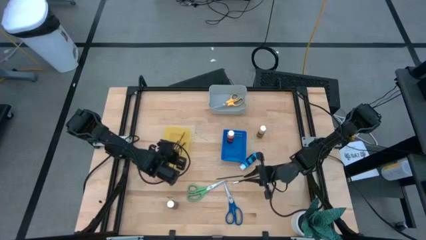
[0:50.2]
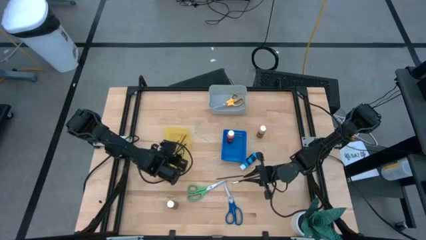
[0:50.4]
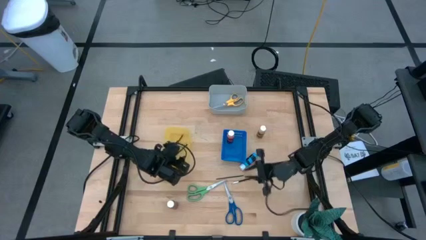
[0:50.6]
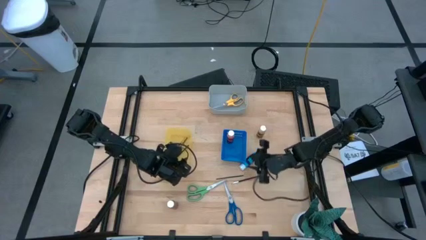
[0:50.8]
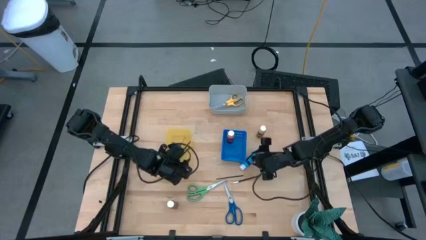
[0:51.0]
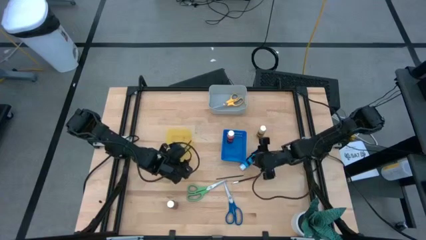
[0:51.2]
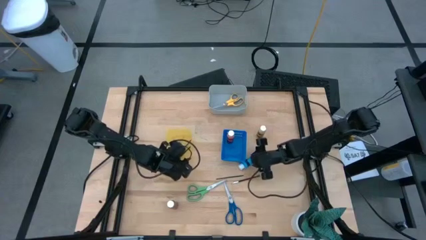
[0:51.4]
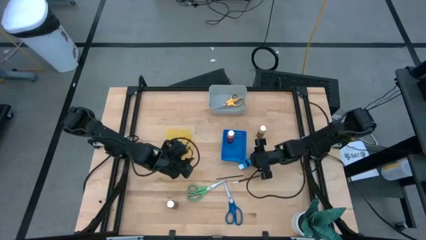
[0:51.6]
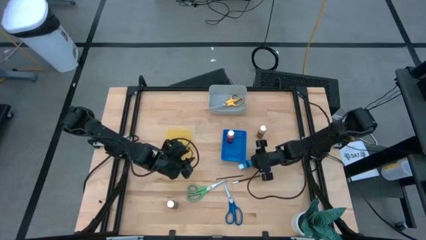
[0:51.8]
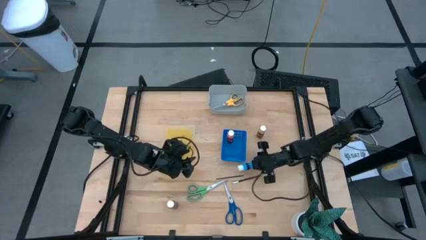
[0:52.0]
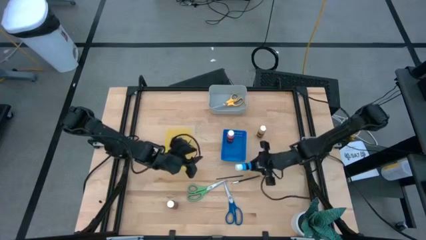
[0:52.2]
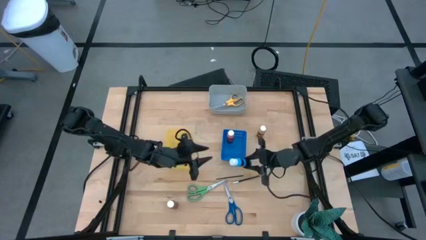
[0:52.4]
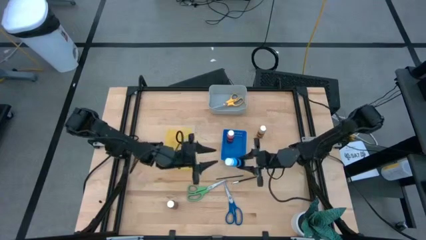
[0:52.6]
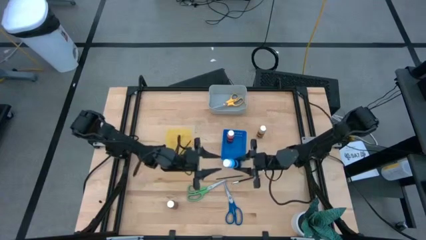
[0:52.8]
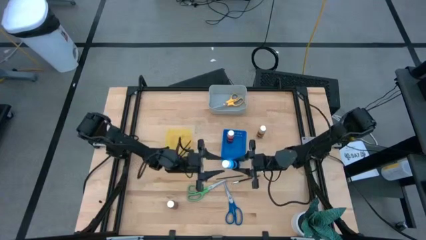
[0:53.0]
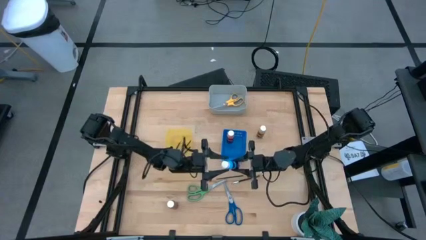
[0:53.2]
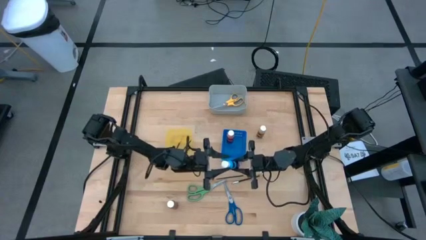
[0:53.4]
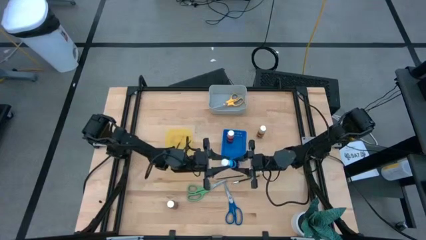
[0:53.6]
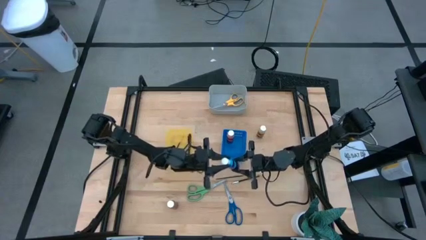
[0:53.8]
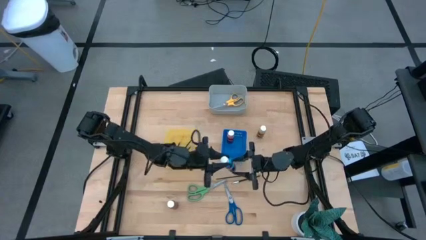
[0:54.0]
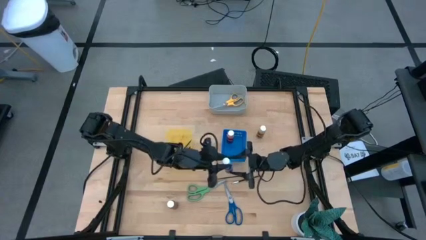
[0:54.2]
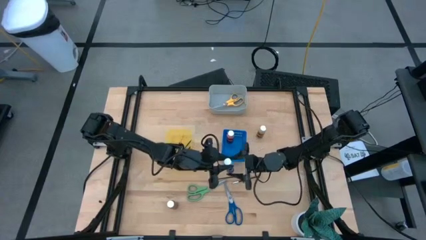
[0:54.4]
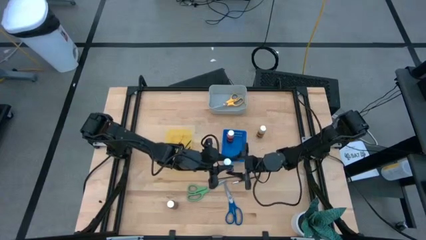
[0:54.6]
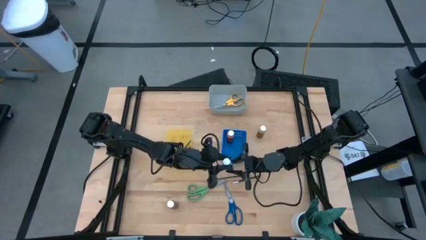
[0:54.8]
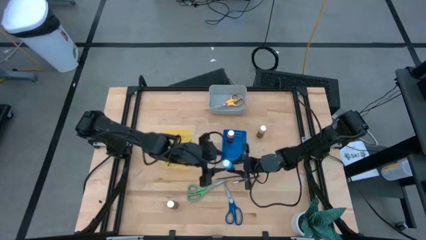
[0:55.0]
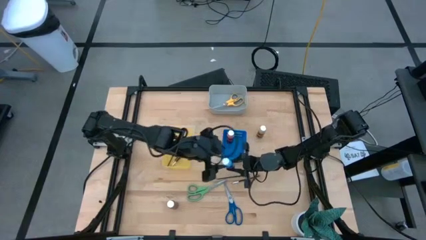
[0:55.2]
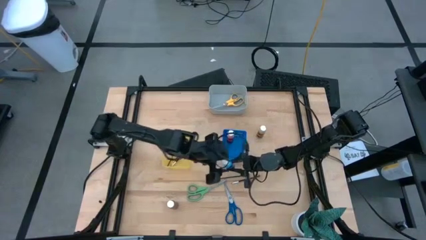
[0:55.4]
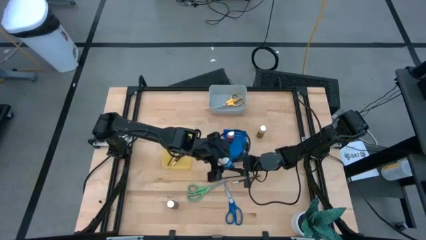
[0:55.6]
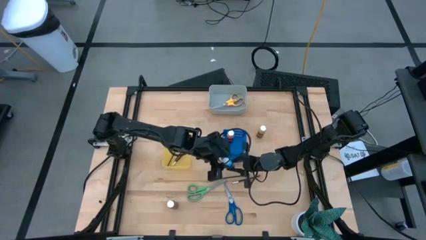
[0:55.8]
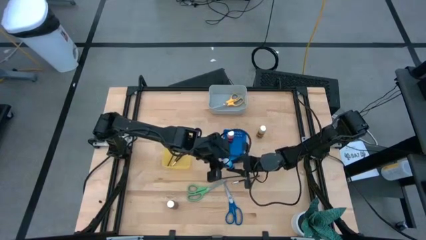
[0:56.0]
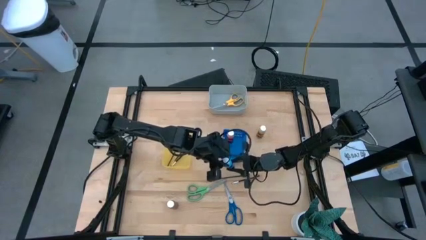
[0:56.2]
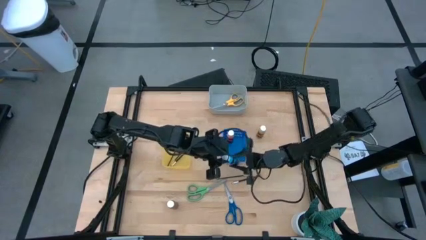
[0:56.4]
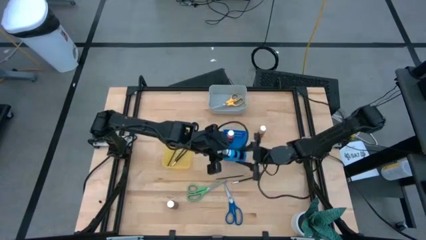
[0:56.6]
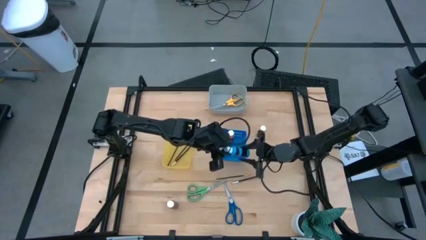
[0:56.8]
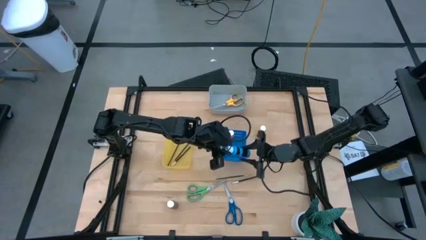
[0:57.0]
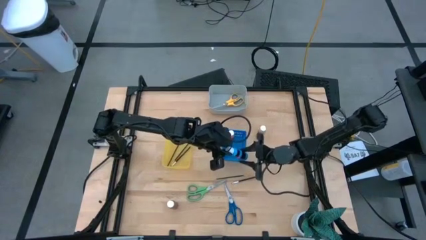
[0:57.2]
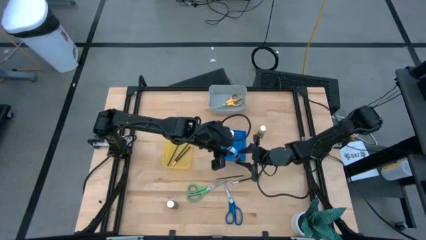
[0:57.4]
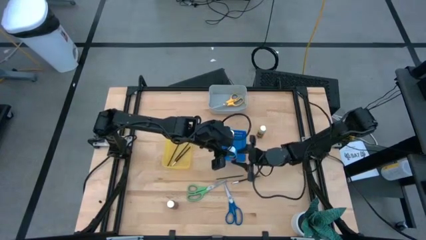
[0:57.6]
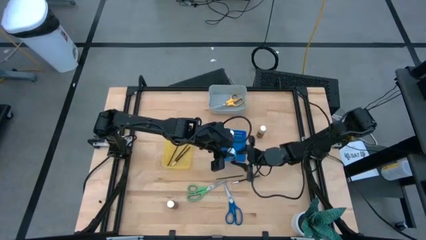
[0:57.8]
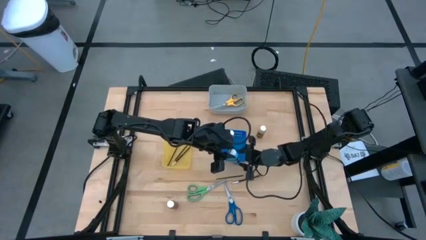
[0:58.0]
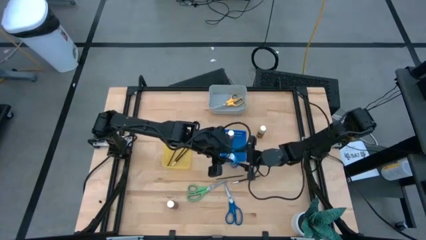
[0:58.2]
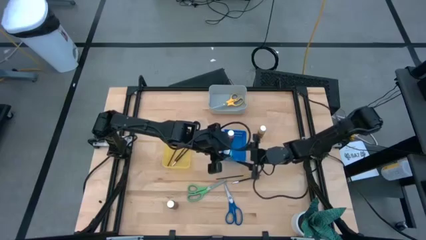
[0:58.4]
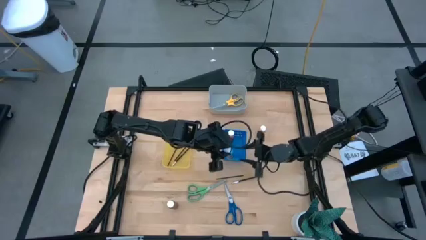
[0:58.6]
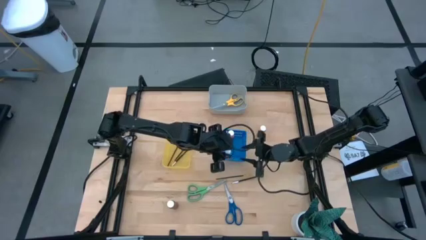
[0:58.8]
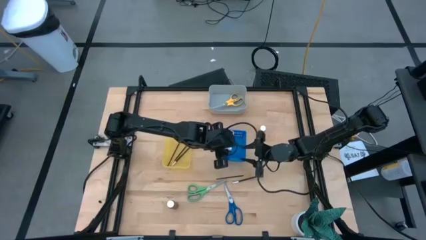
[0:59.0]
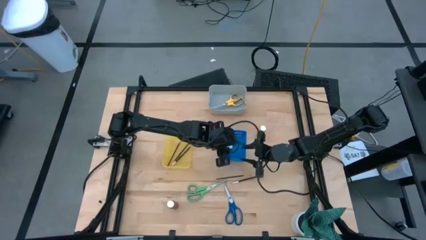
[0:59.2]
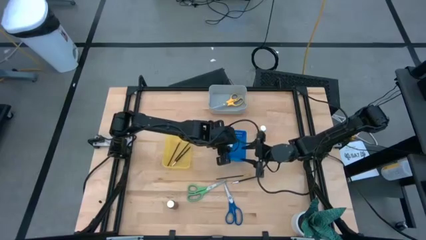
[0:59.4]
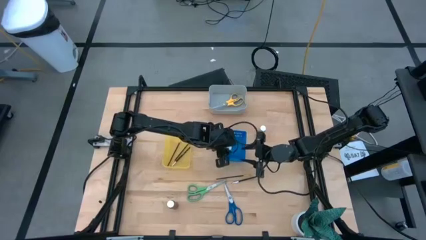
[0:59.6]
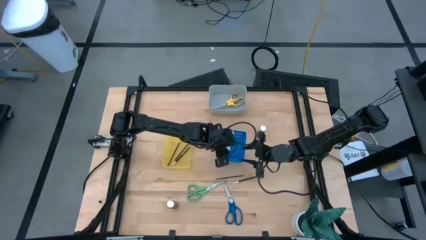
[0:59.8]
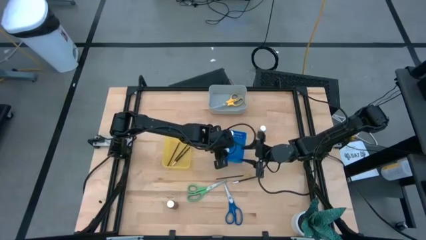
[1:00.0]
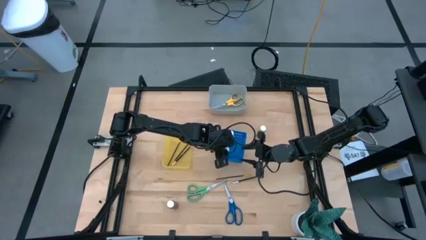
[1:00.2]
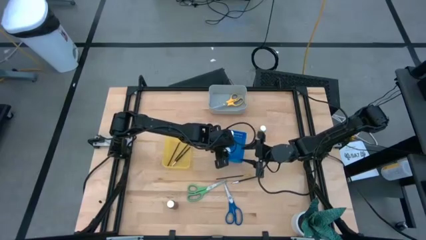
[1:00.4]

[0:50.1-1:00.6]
Task: Pick & Place Paint Supplies
Put the blue paint bottle into the blue bin

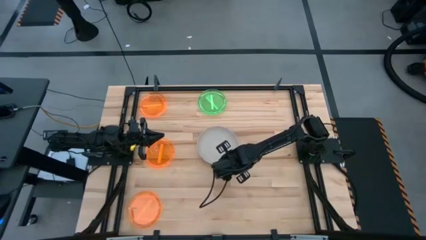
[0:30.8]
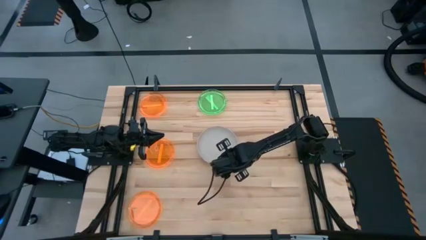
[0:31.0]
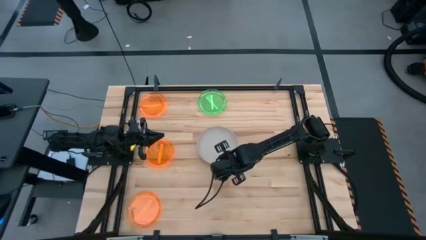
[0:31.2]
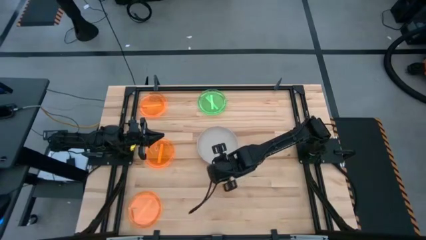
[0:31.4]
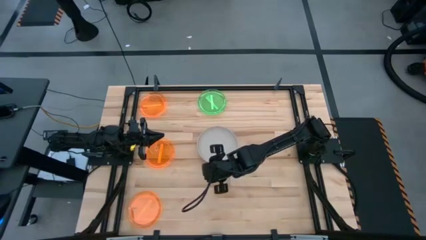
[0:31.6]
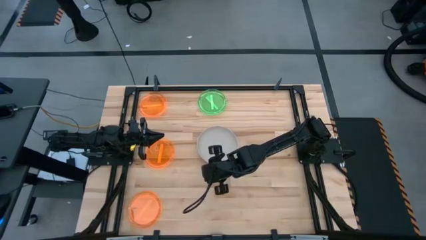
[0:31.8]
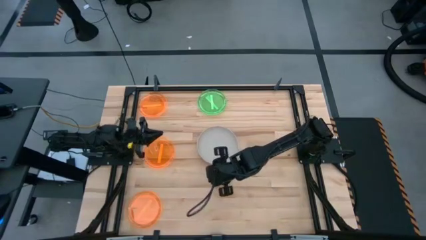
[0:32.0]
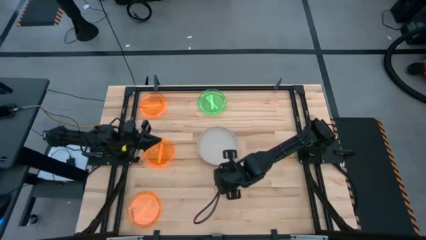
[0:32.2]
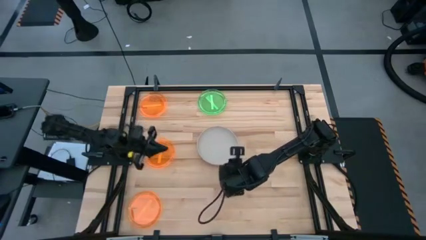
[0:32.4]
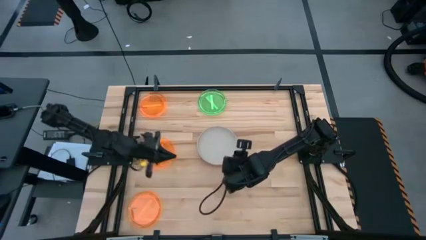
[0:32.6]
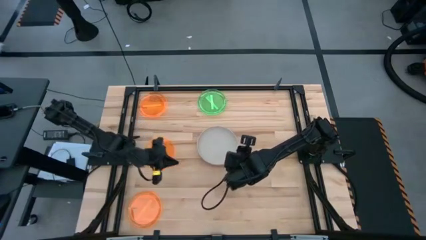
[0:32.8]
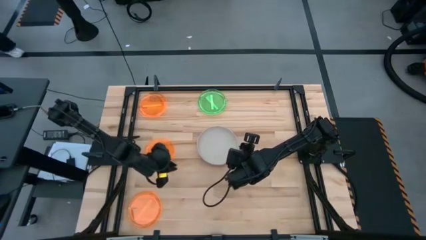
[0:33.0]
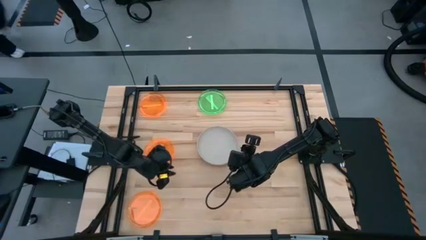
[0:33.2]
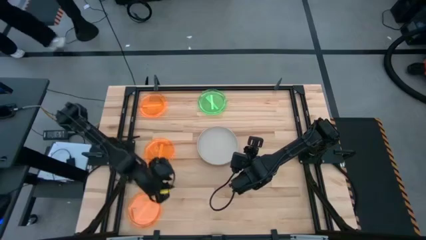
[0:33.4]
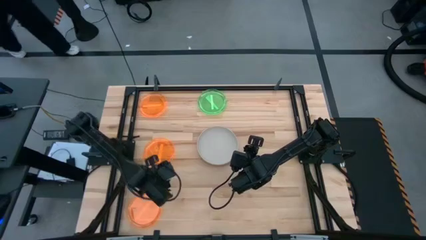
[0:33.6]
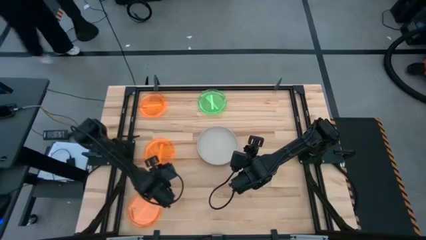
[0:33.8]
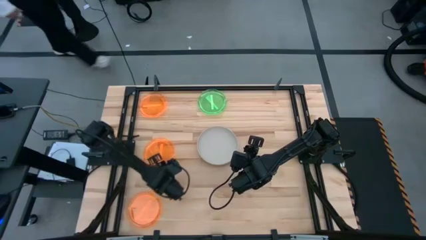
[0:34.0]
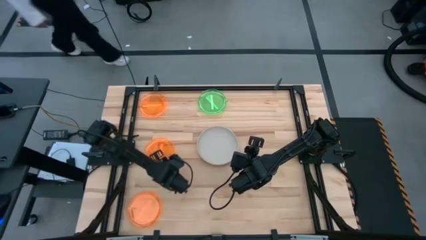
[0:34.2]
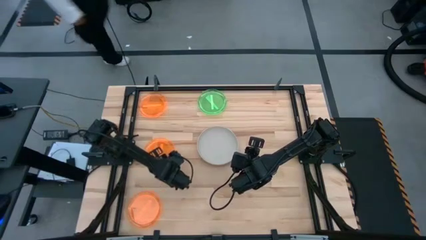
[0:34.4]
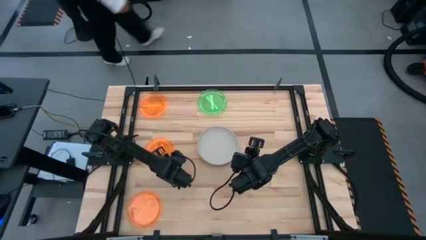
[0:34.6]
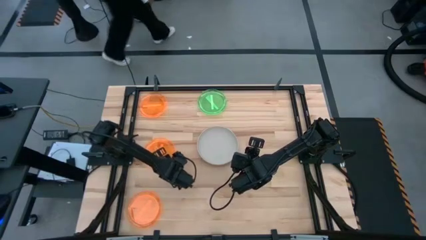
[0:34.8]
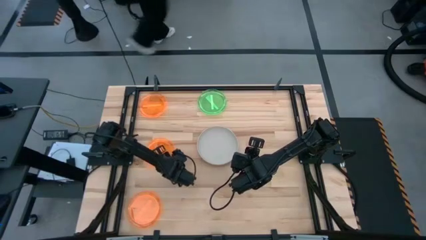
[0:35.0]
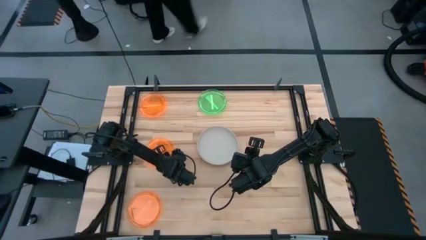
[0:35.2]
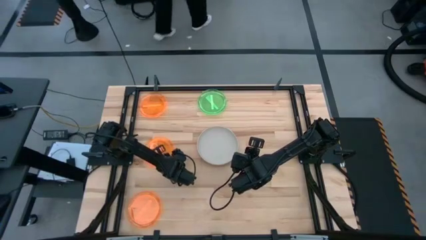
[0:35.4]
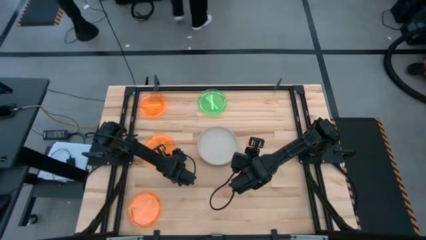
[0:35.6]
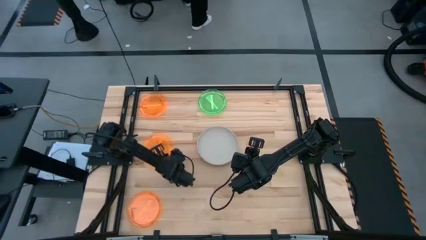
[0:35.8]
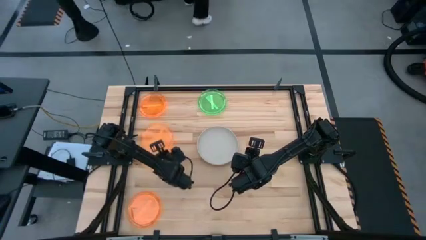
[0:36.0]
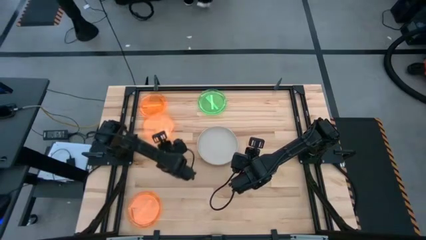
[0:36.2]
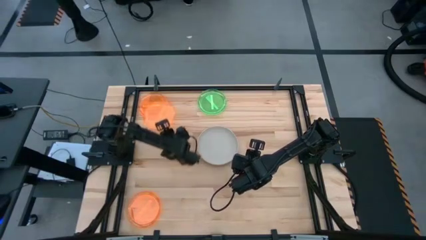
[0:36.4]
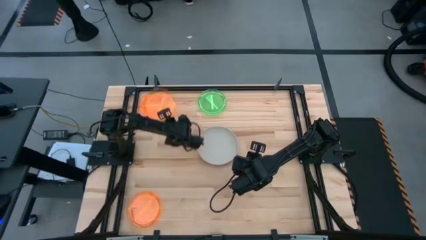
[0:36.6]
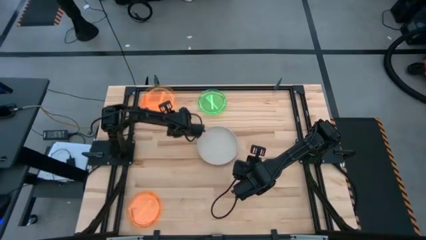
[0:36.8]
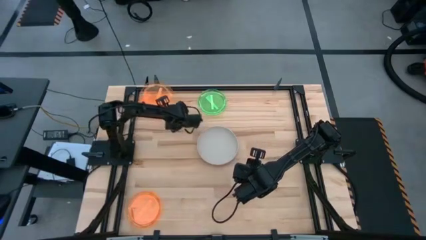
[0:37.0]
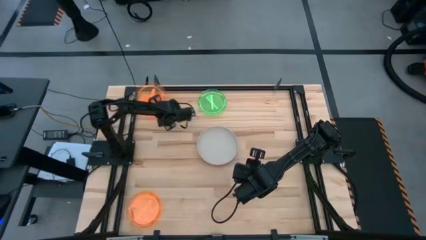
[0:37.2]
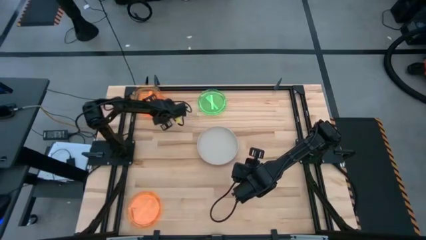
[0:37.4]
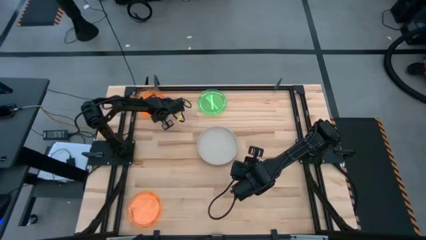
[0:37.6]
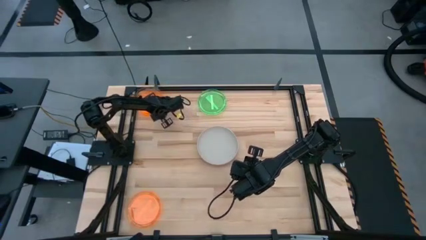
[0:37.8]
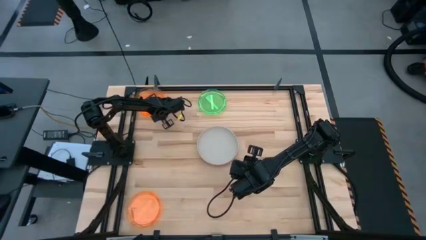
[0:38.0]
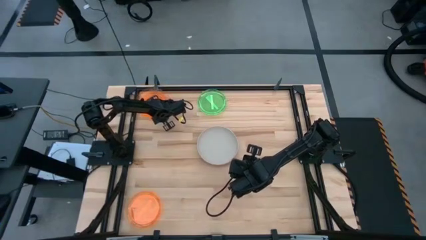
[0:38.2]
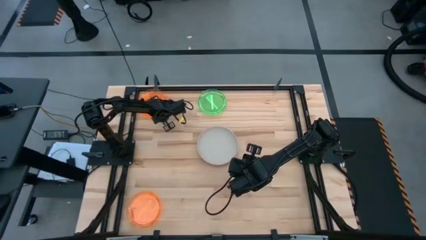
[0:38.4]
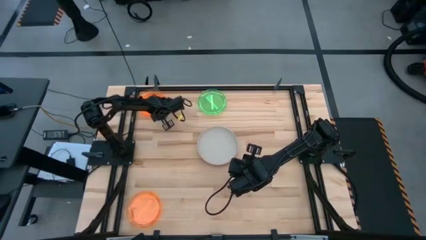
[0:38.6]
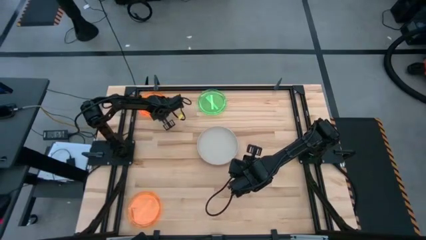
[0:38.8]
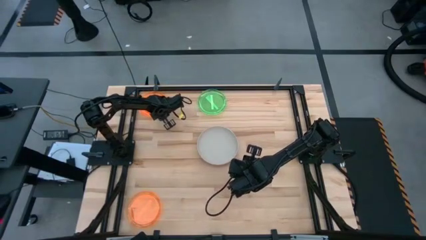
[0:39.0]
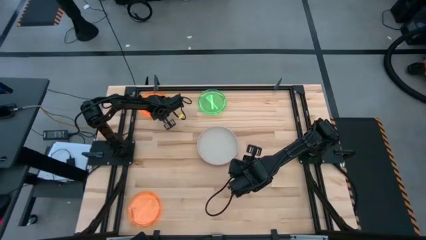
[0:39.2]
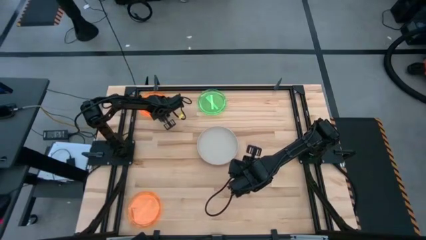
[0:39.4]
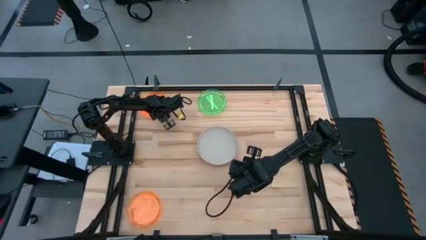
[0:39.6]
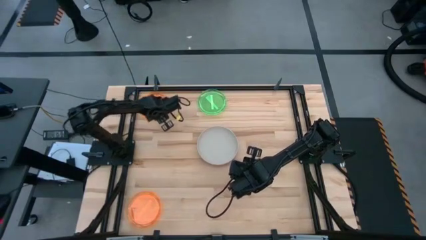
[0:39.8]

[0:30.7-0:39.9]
Task: Stack plastic plates
Stack the middle orange plate on top of the top orange plate
